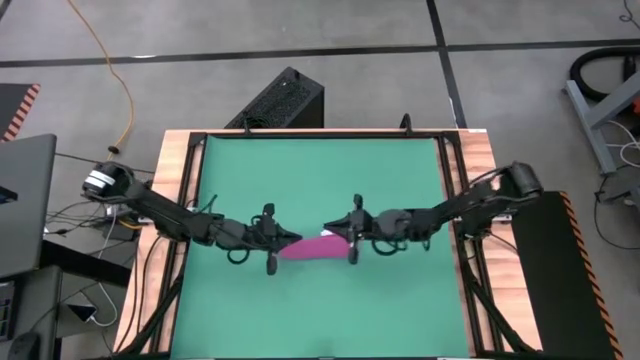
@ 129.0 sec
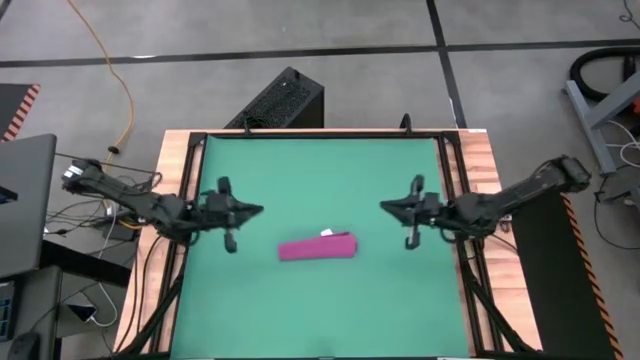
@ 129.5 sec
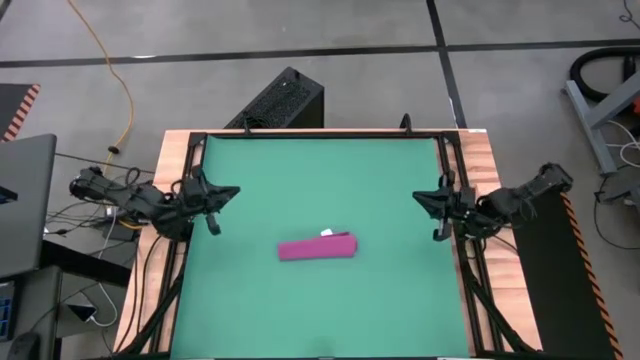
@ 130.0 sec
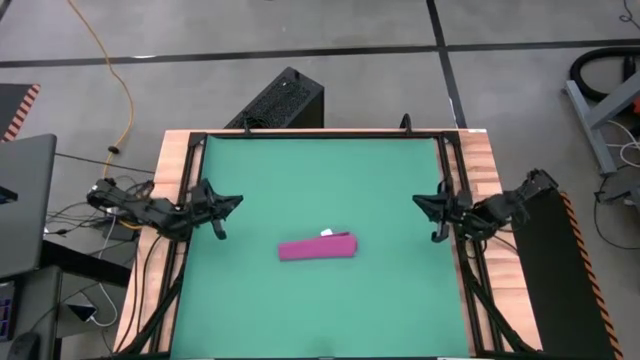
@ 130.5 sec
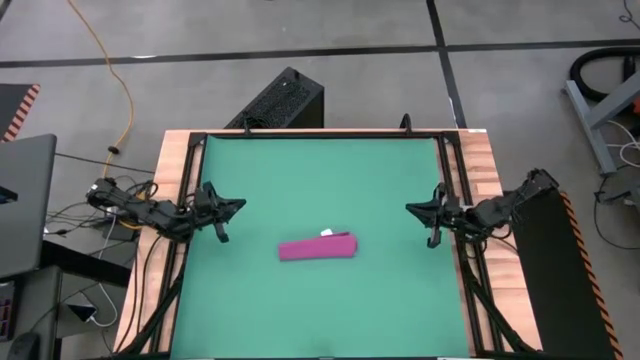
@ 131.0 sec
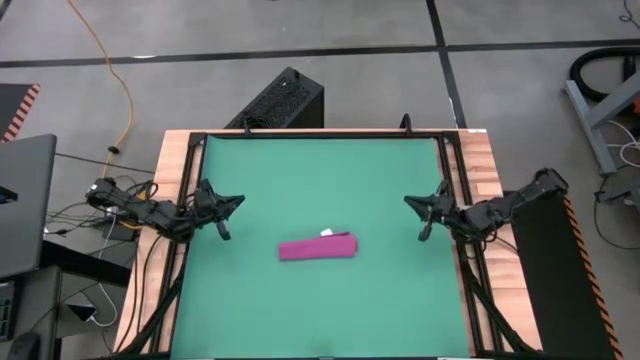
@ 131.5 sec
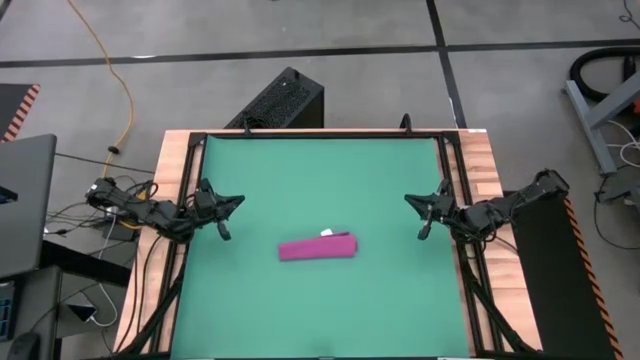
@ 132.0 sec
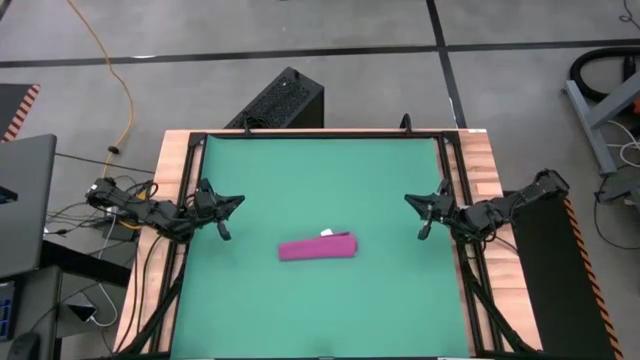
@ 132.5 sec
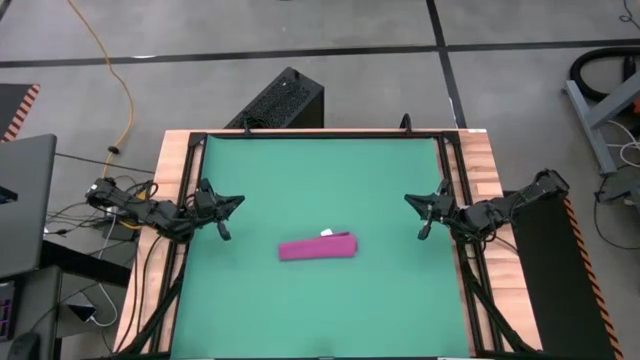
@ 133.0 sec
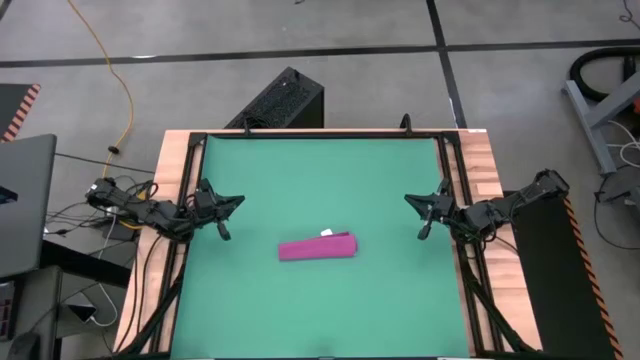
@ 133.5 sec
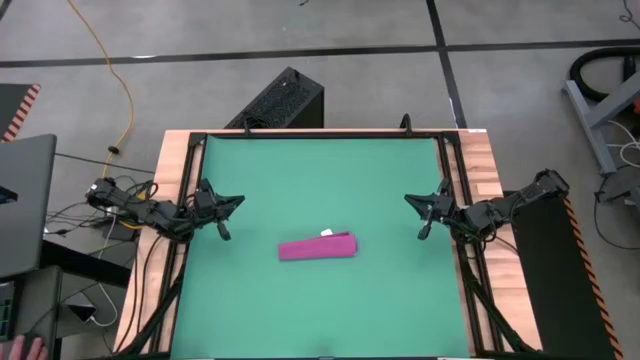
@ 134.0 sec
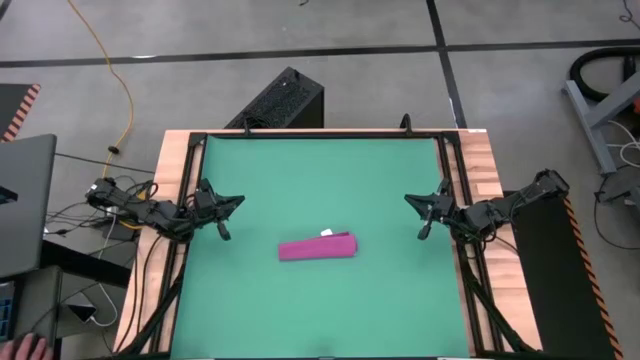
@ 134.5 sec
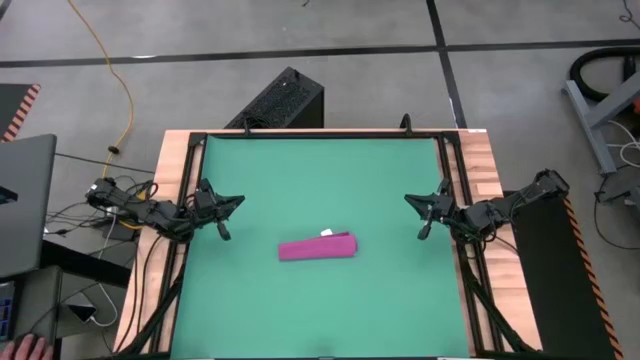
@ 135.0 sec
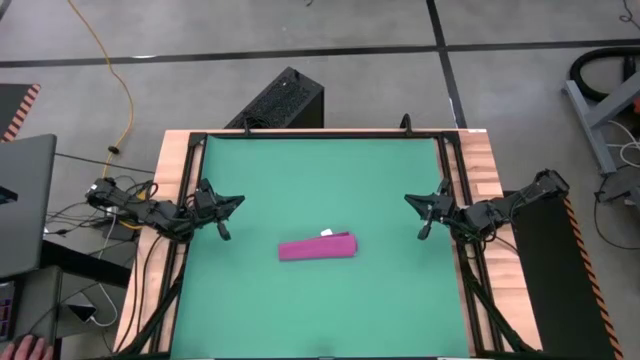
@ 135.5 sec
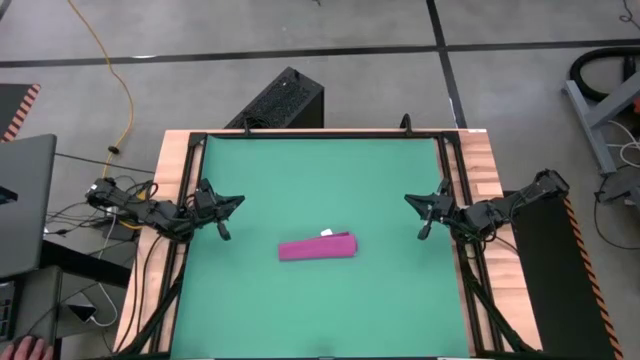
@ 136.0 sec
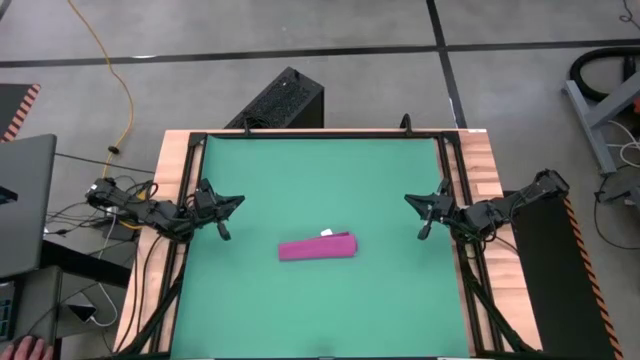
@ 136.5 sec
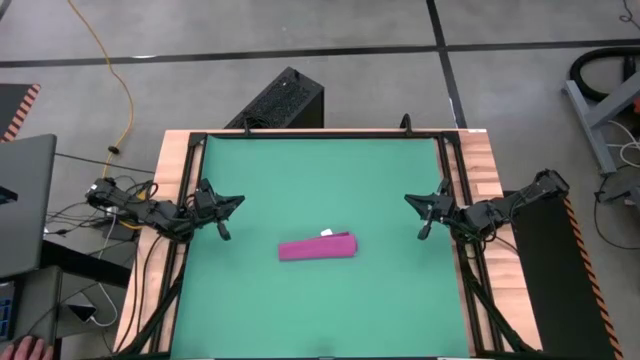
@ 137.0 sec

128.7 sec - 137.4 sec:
Task: Roll towel
Return to Home Position
